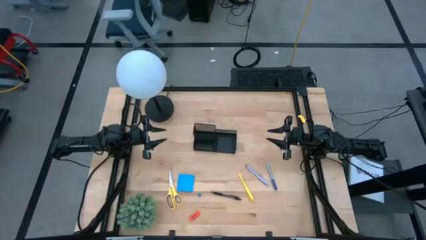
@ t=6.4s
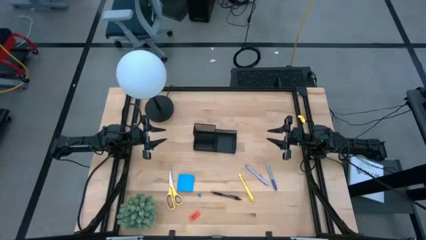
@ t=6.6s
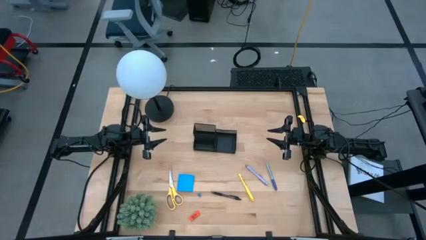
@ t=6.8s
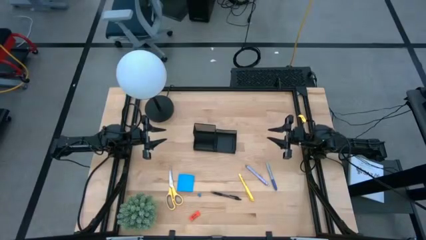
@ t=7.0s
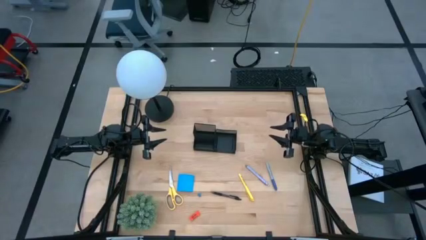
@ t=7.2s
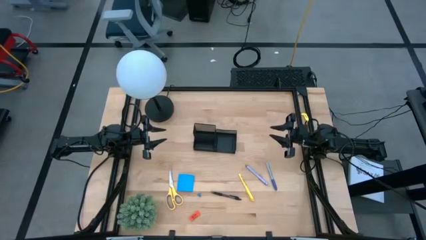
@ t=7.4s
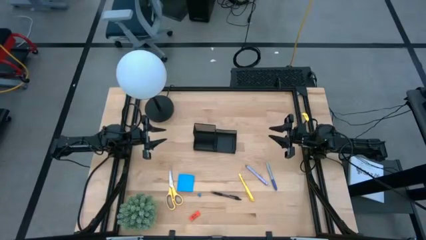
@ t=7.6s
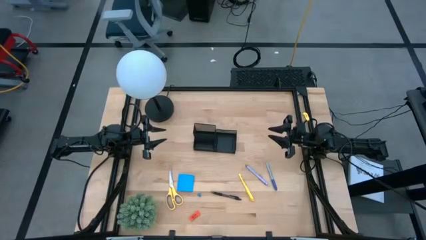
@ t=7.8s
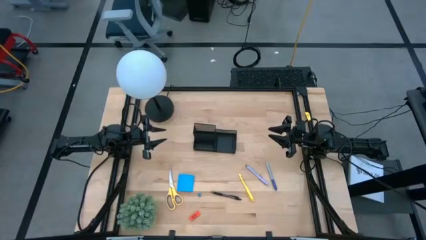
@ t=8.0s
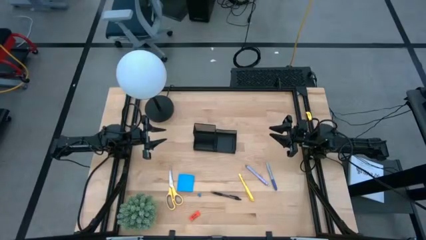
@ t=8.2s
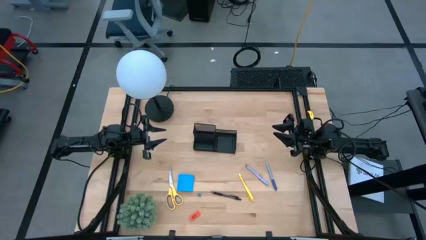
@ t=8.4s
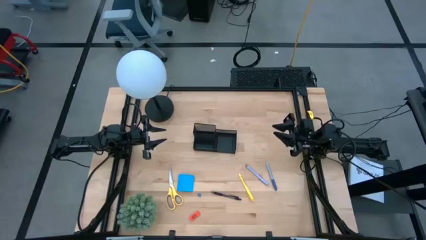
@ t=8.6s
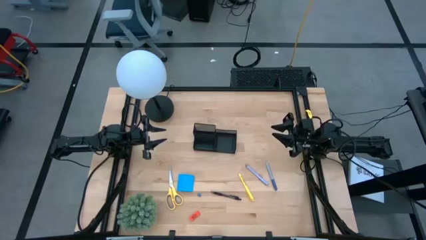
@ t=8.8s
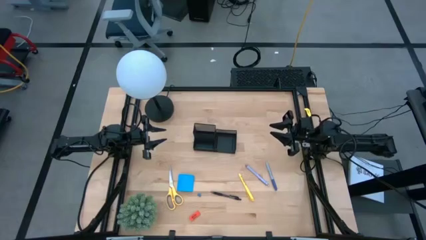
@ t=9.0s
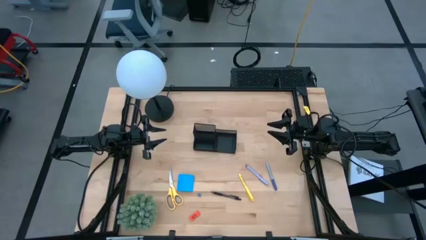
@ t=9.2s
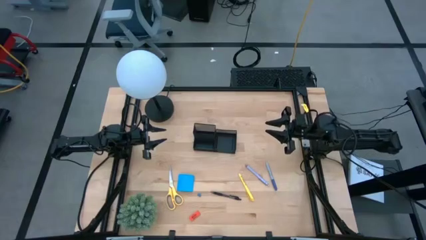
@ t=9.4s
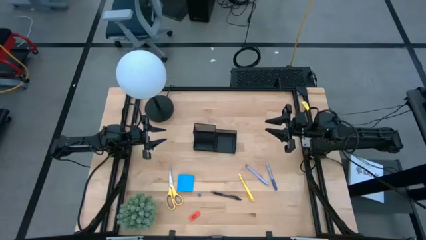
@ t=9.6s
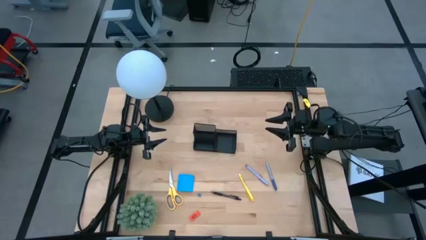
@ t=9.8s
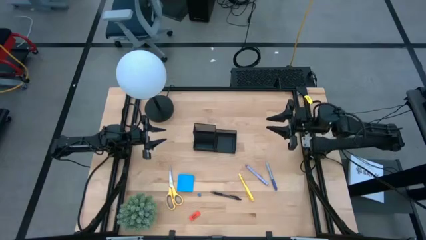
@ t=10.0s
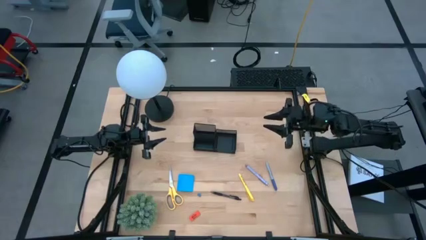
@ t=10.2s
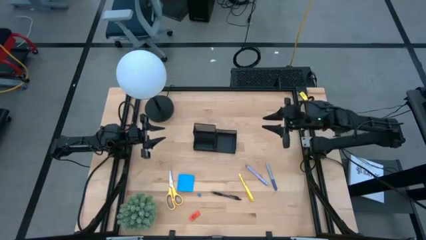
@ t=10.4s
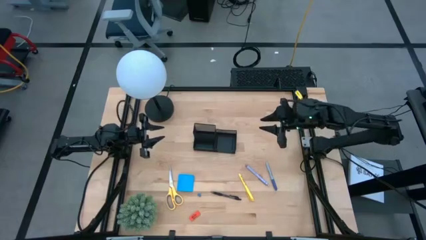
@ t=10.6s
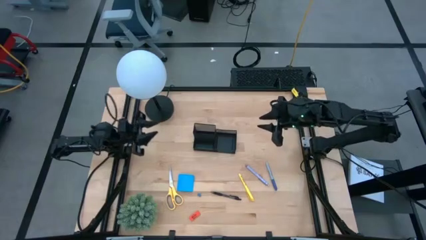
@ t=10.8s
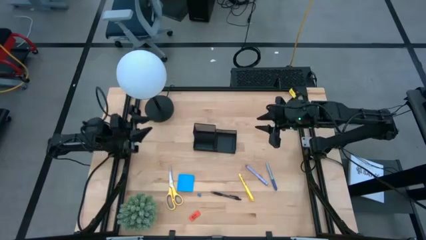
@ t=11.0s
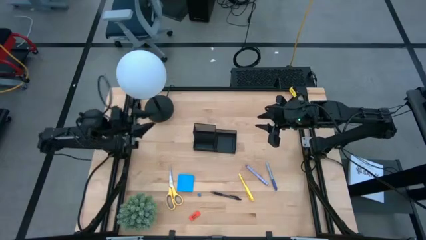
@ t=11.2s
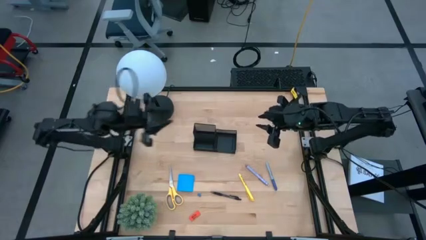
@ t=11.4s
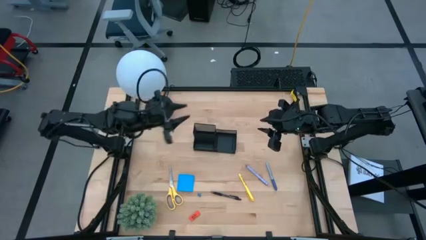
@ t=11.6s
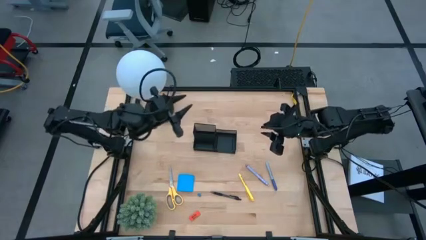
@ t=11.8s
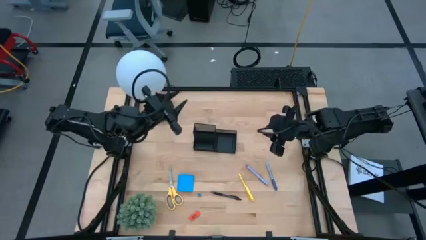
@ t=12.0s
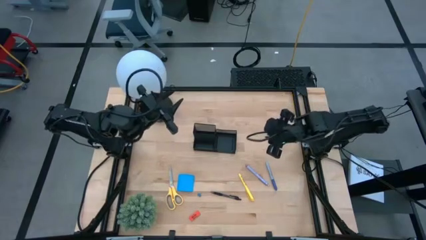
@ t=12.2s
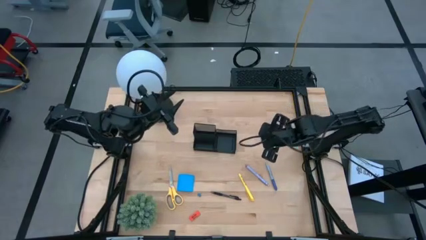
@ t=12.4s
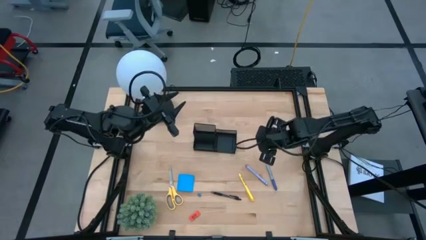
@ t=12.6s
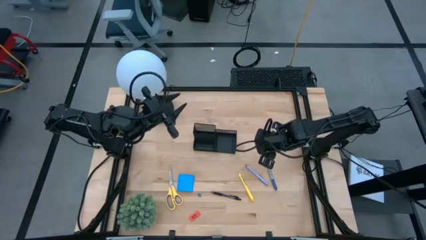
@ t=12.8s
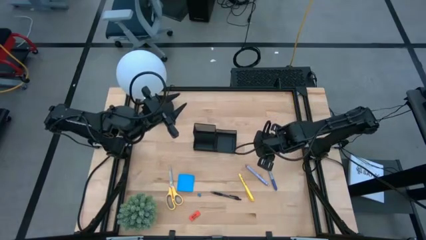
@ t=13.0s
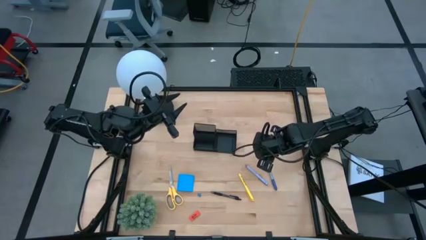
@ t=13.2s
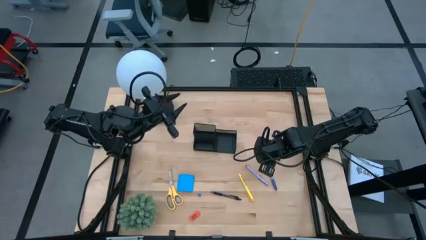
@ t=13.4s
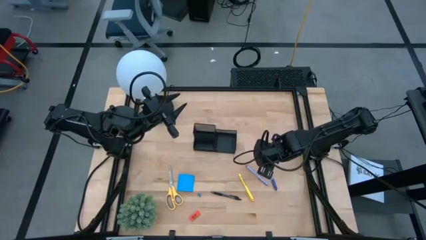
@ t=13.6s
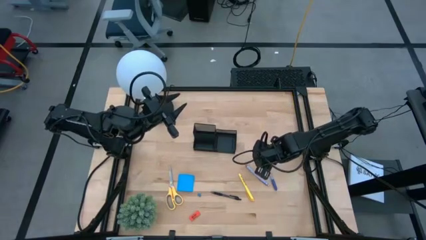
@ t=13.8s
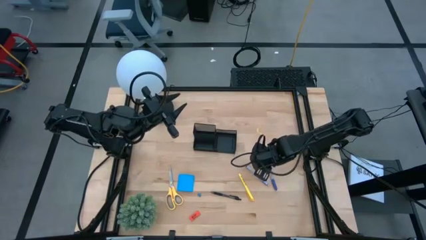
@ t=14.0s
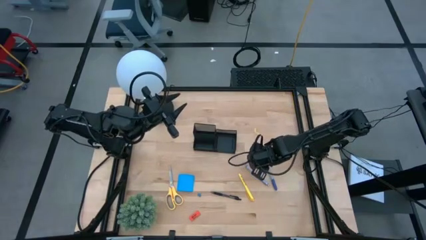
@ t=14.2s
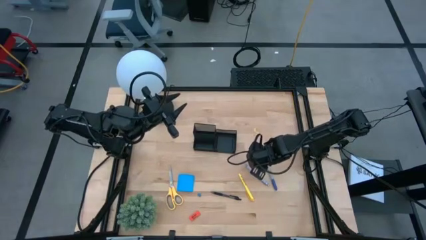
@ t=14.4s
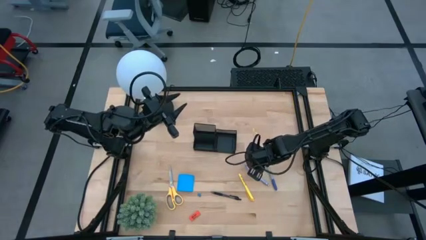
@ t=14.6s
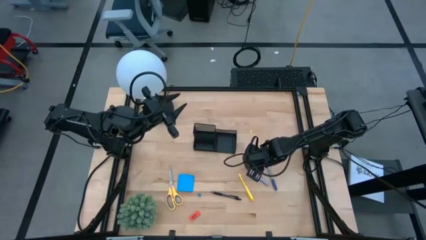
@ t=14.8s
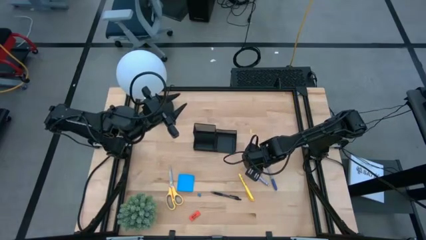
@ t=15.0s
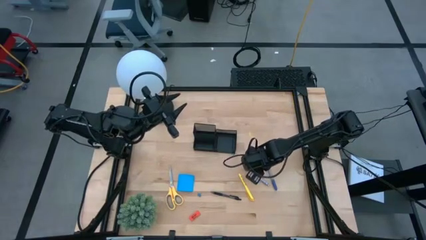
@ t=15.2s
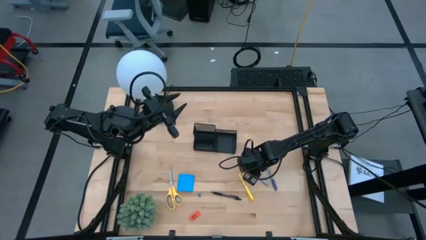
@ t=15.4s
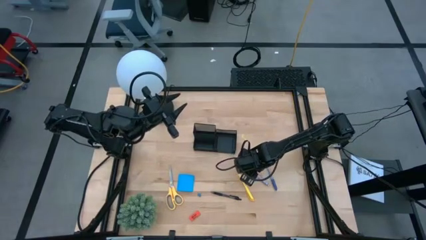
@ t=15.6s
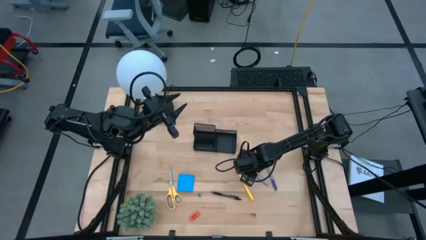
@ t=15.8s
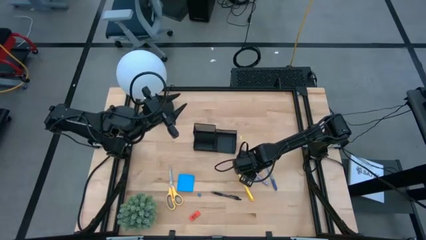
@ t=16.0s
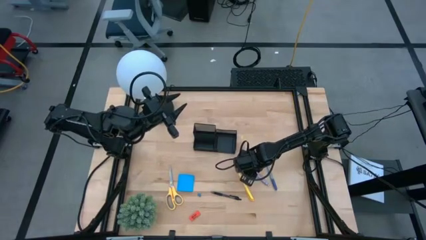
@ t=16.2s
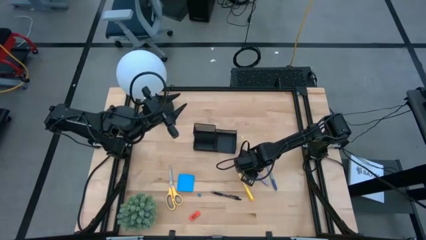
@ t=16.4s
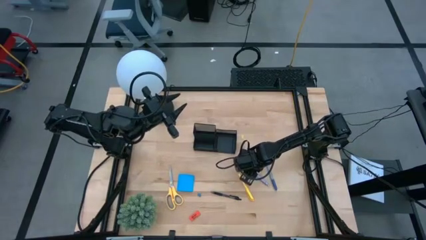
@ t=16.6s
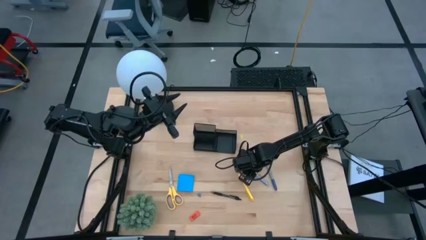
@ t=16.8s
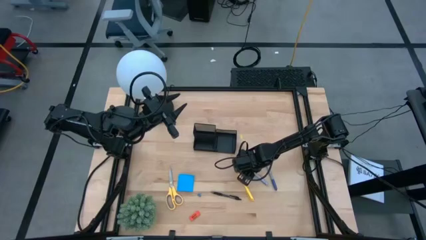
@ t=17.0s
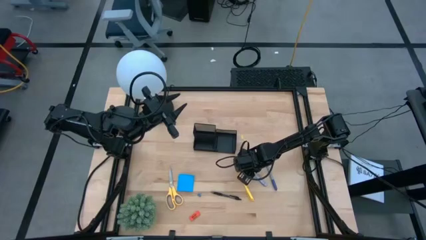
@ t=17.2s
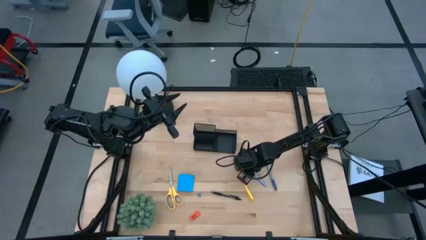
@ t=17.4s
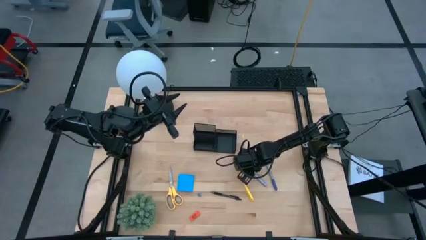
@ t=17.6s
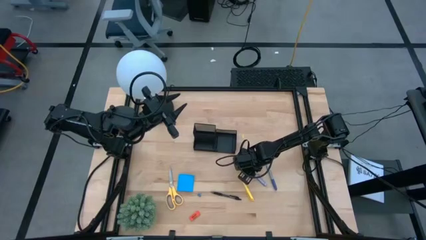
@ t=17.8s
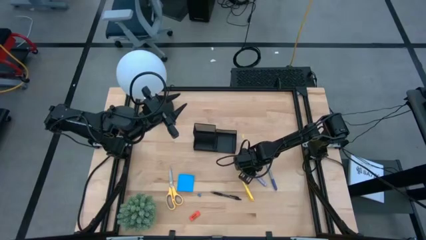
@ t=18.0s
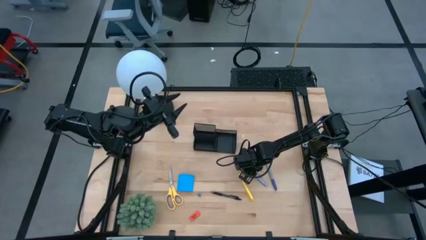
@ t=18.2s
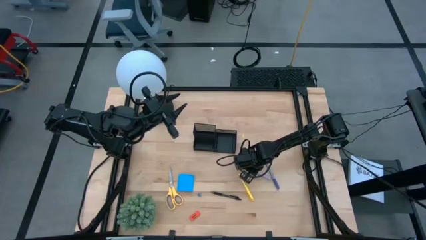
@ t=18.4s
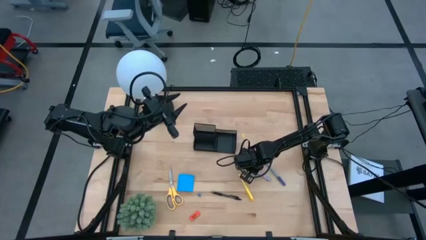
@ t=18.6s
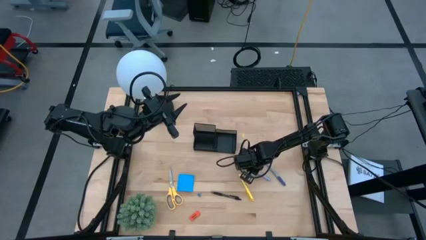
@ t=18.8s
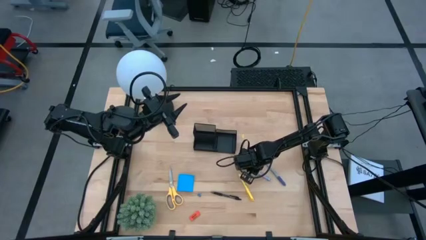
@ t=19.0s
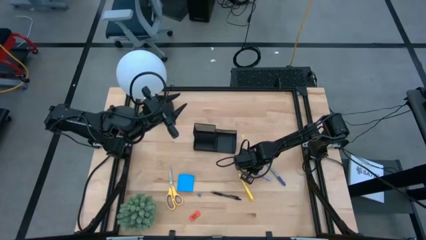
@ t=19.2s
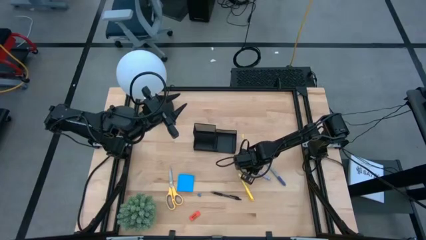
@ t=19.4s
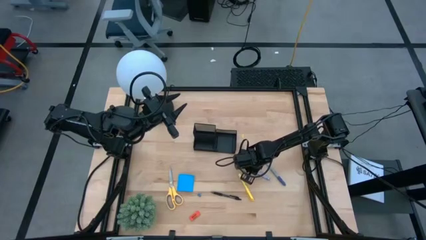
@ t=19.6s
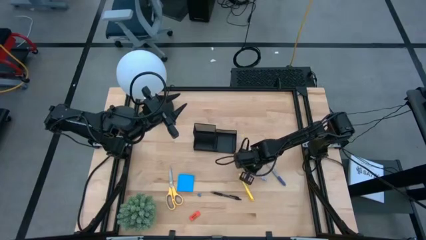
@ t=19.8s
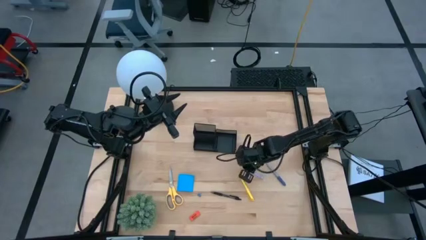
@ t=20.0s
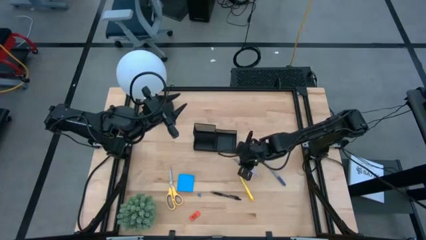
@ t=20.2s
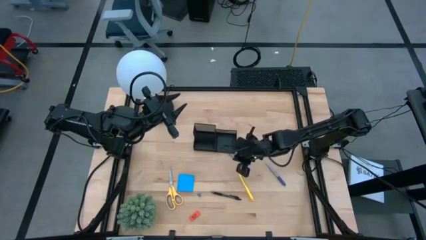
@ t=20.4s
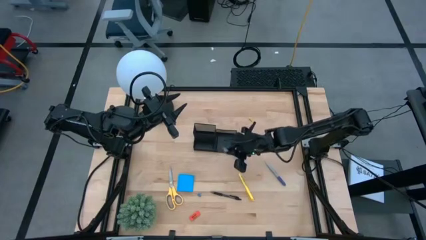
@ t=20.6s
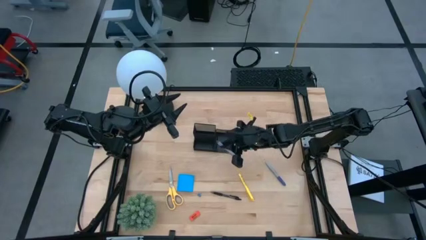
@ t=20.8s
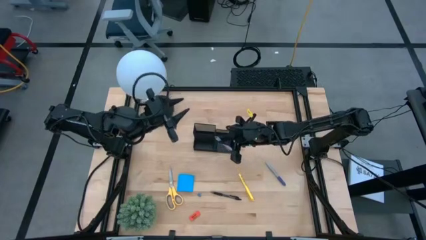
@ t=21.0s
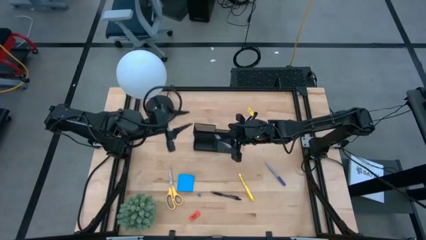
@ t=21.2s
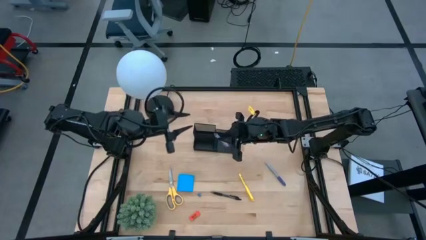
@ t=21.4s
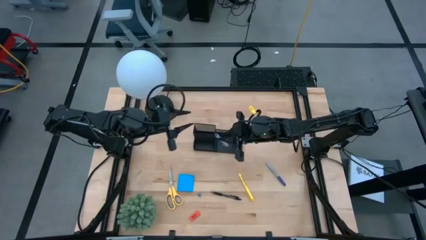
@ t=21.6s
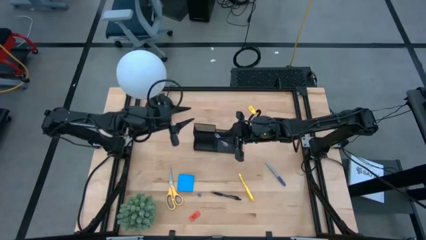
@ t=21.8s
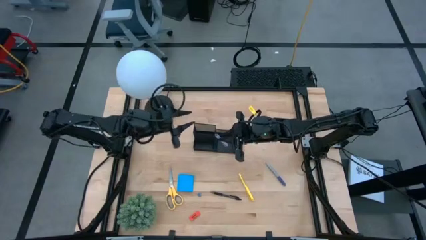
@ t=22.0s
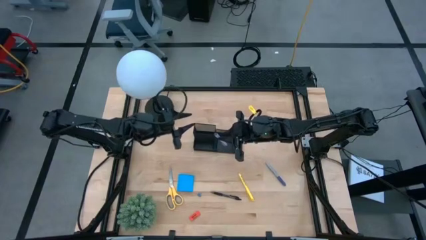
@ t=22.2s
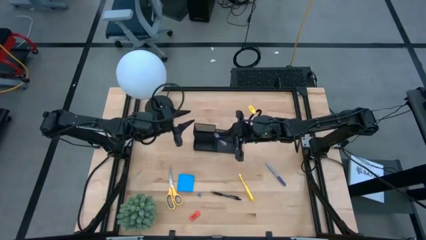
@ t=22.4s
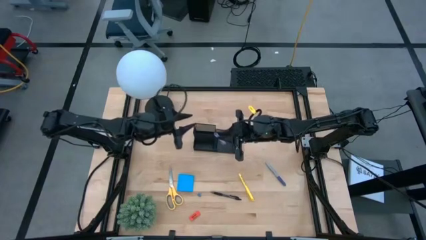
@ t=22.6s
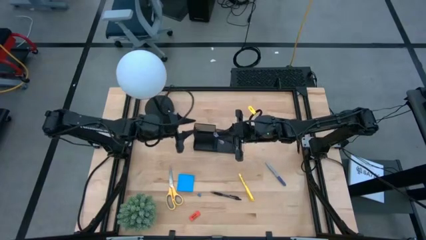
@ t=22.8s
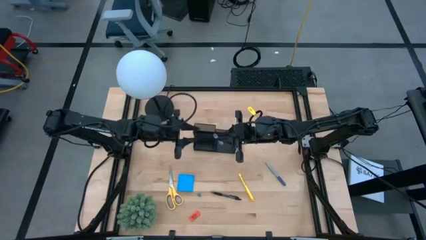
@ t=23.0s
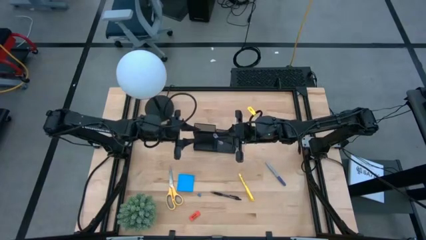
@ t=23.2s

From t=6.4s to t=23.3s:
Task: Pick and place office supplies into organizer
Put the violet pen into the black desk organizer
